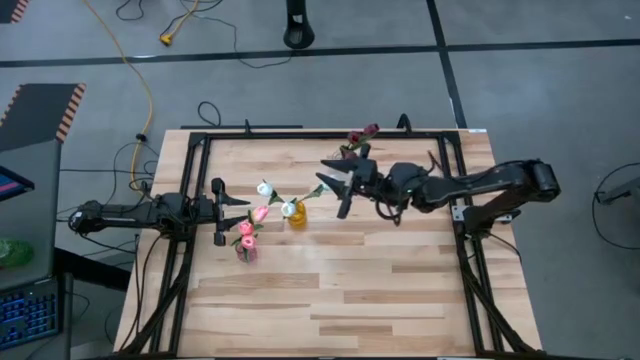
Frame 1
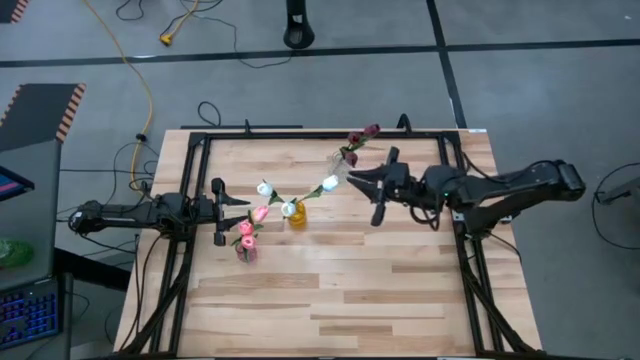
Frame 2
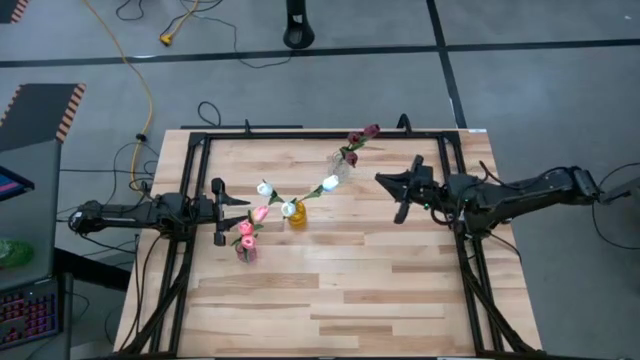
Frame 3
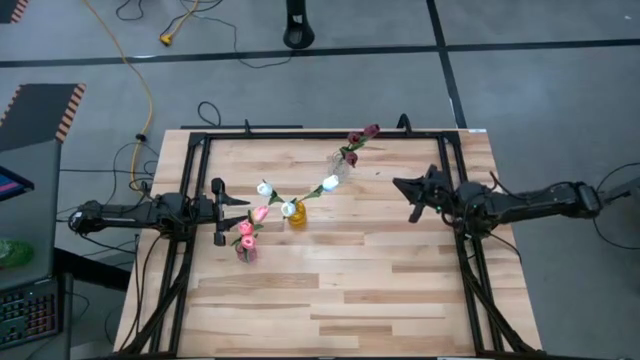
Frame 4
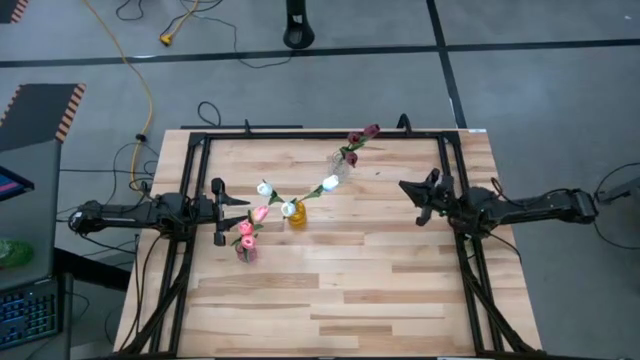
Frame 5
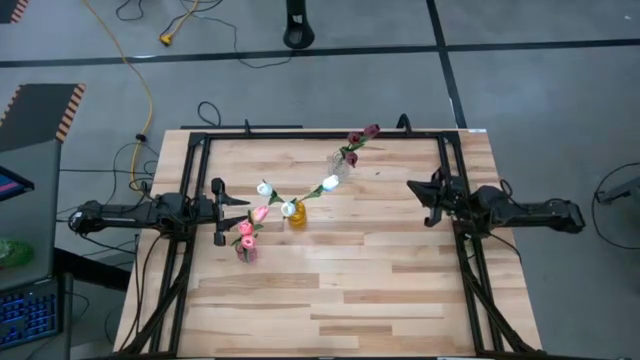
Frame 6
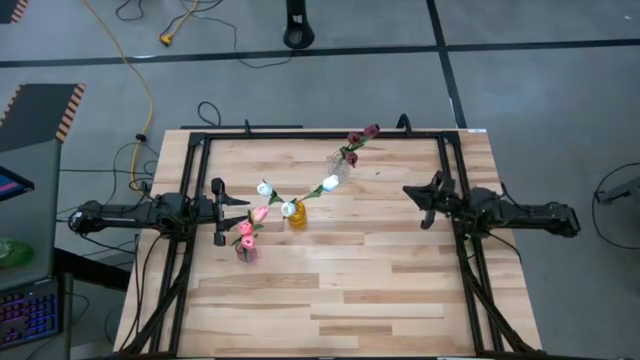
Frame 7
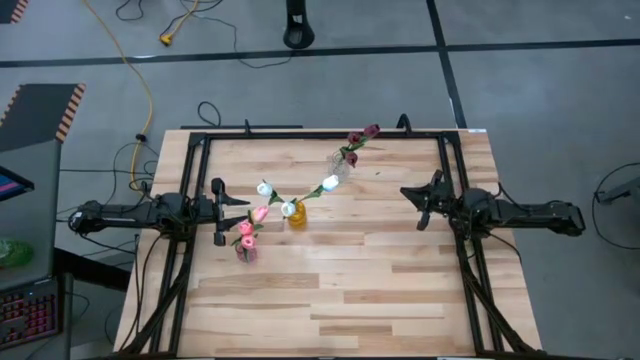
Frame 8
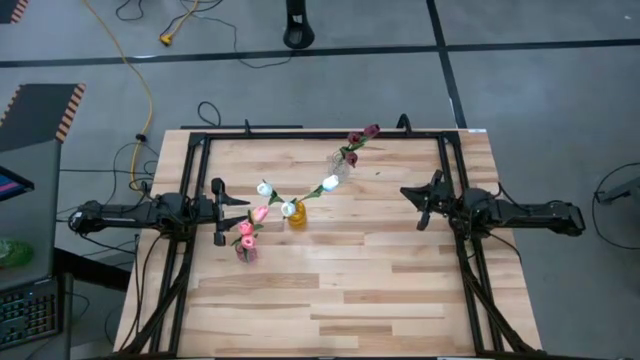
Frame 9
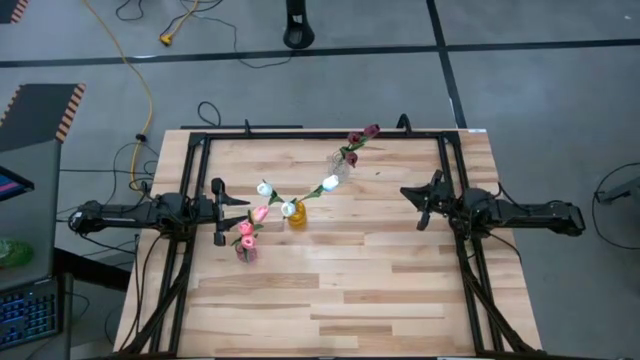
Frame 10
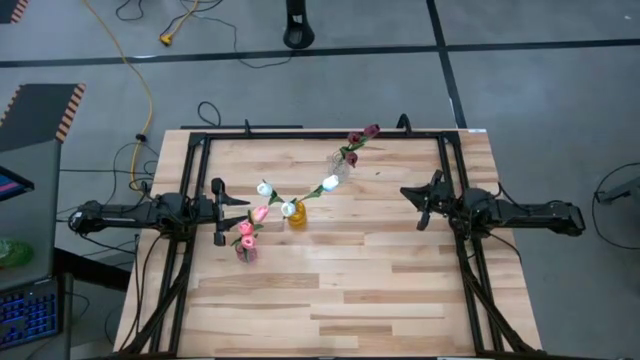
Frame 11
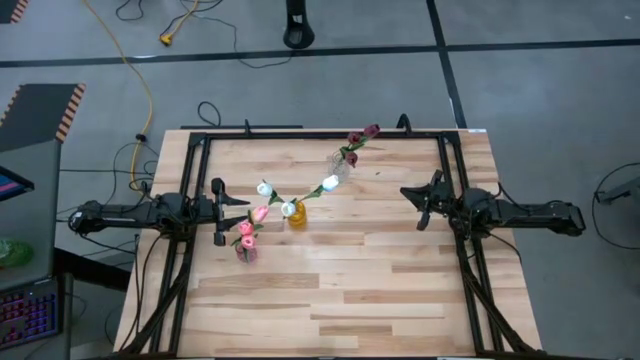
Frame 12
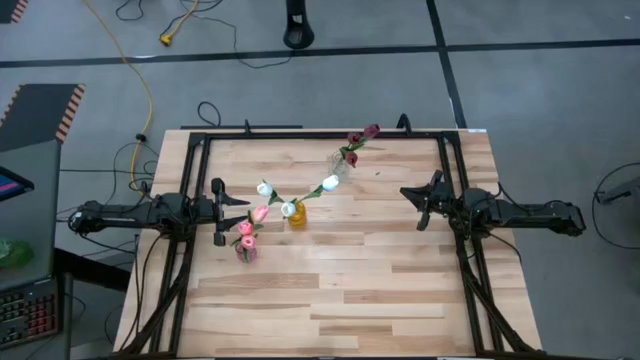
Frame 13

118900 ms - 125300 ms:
Task: Sort flowers into vase by color
Return to Home Position

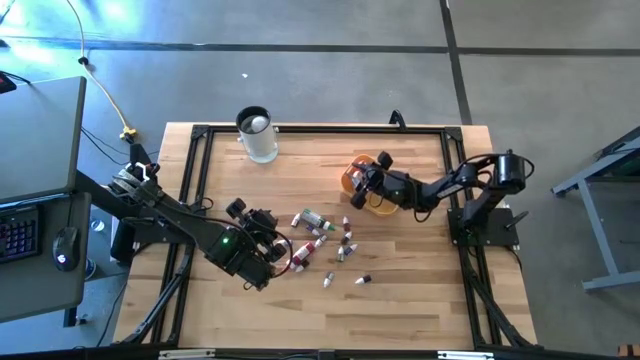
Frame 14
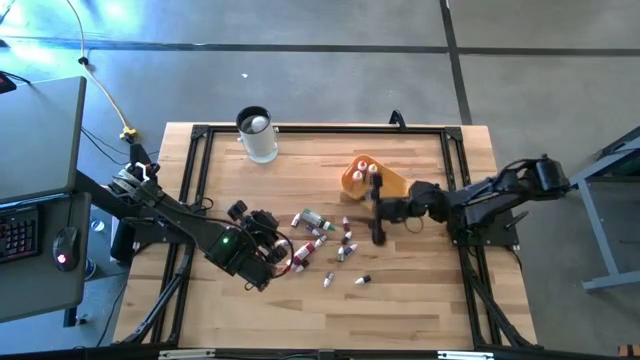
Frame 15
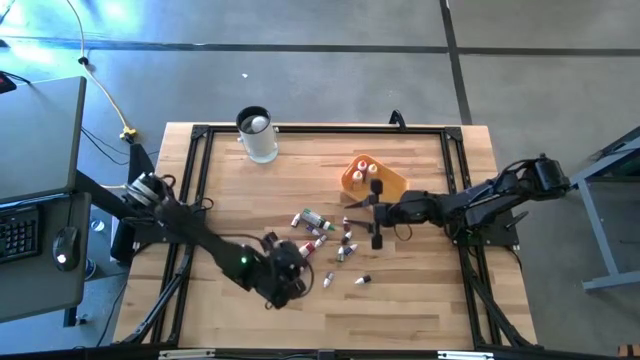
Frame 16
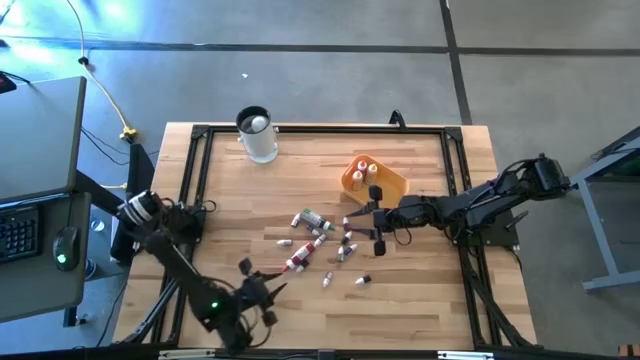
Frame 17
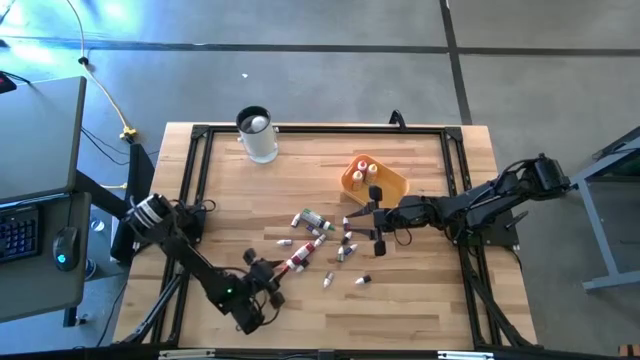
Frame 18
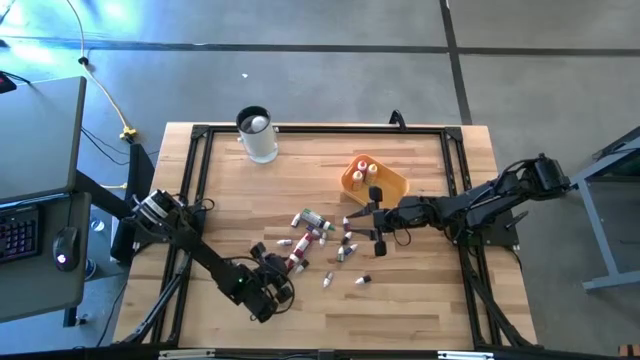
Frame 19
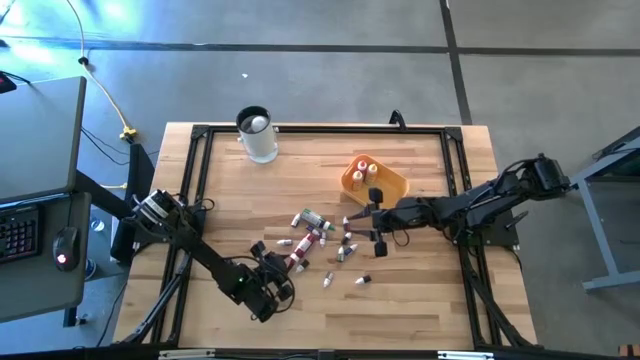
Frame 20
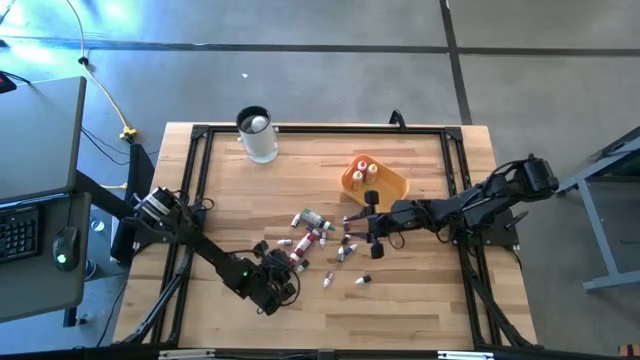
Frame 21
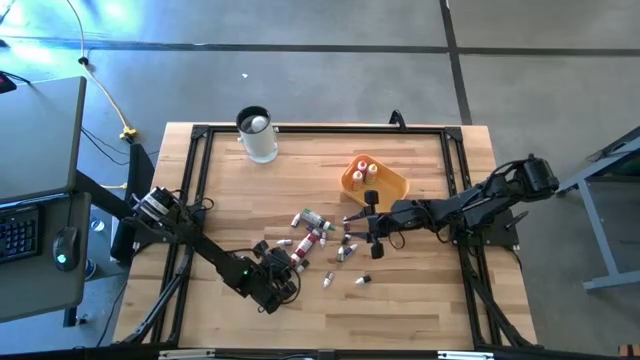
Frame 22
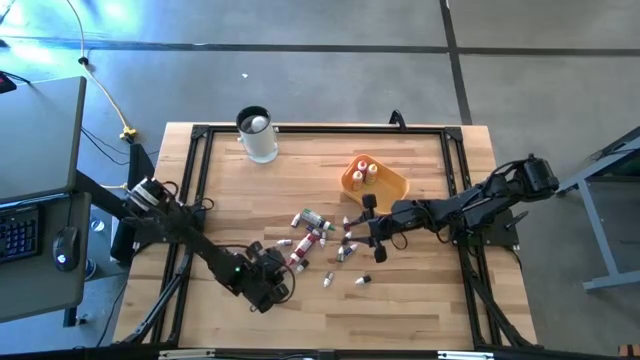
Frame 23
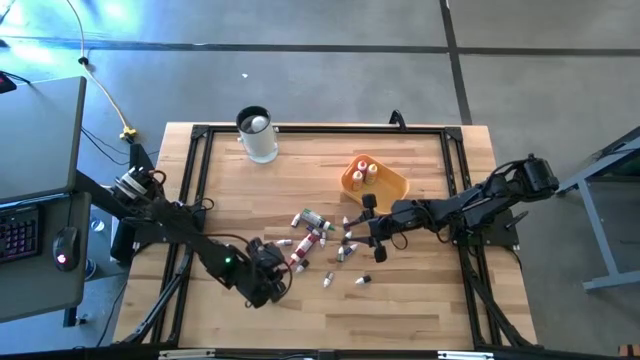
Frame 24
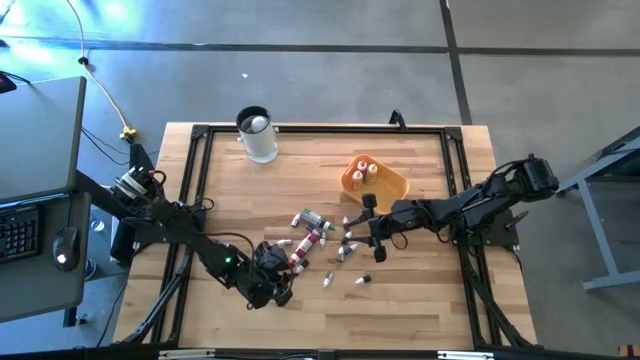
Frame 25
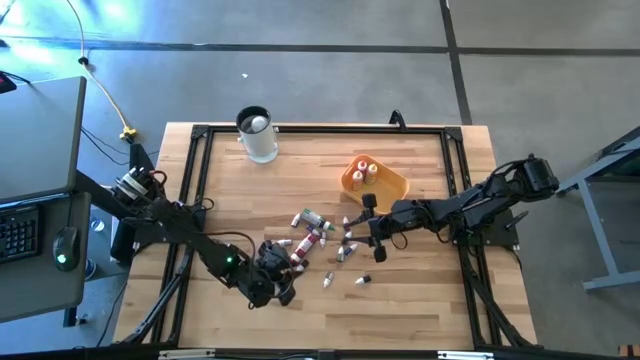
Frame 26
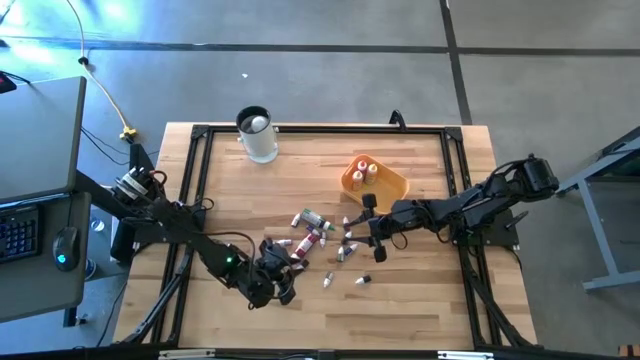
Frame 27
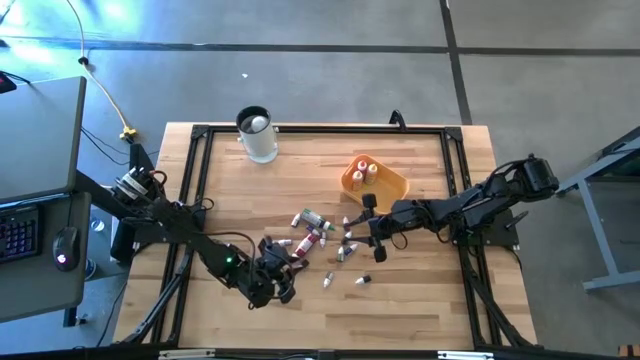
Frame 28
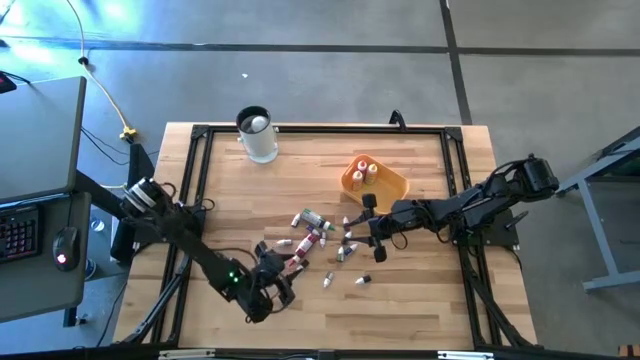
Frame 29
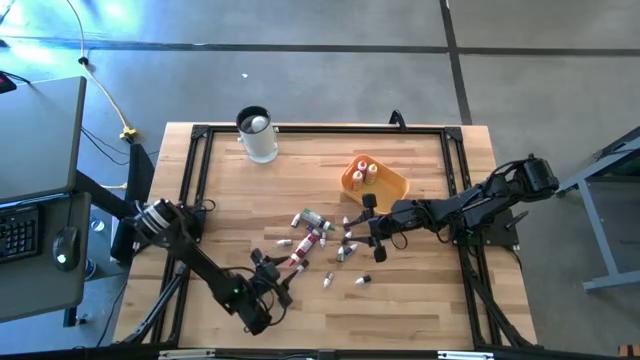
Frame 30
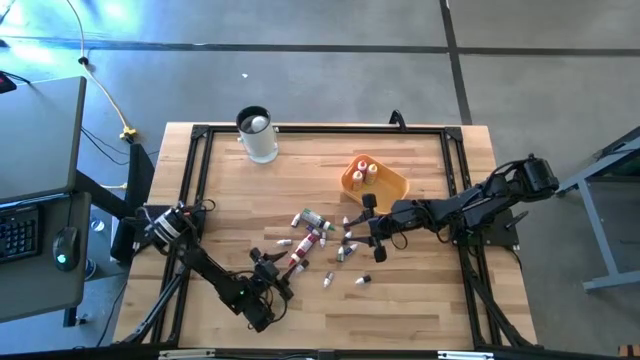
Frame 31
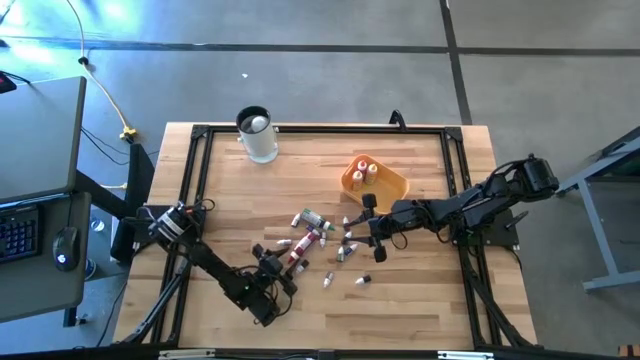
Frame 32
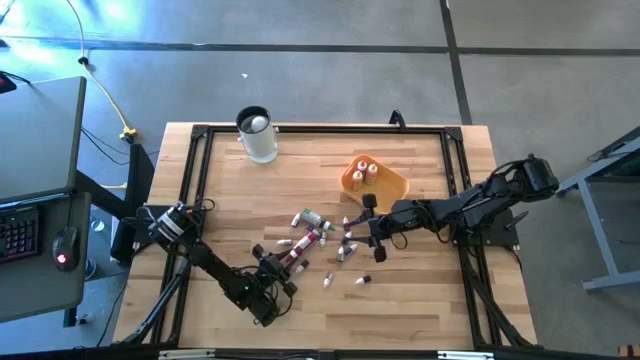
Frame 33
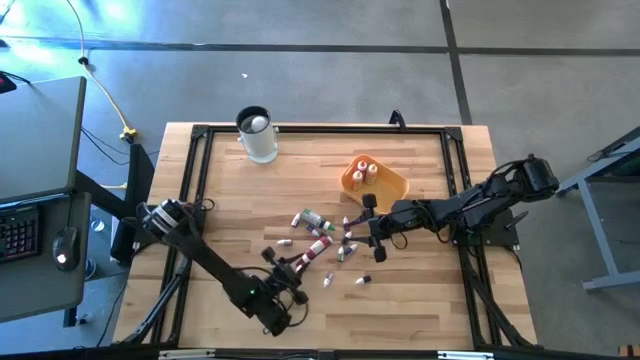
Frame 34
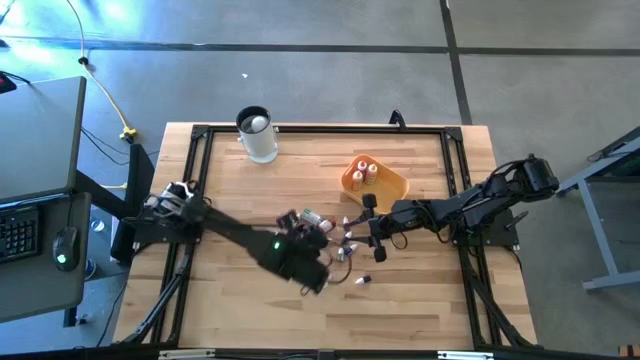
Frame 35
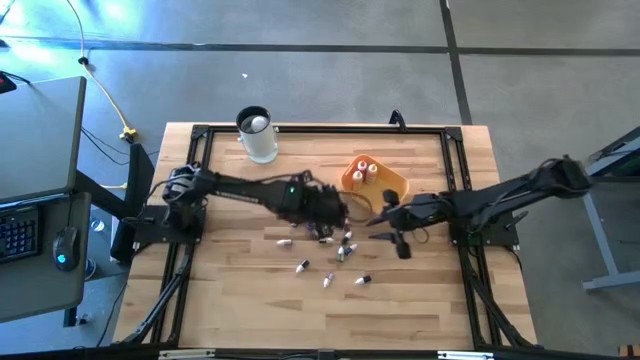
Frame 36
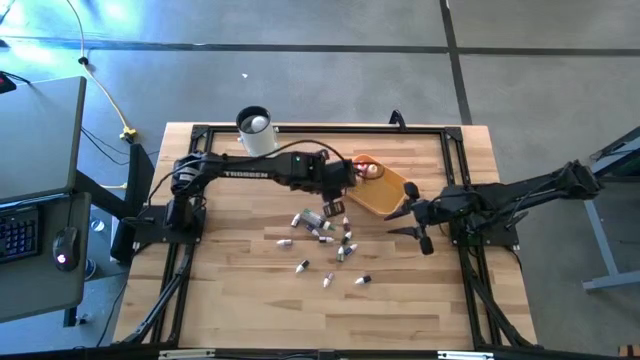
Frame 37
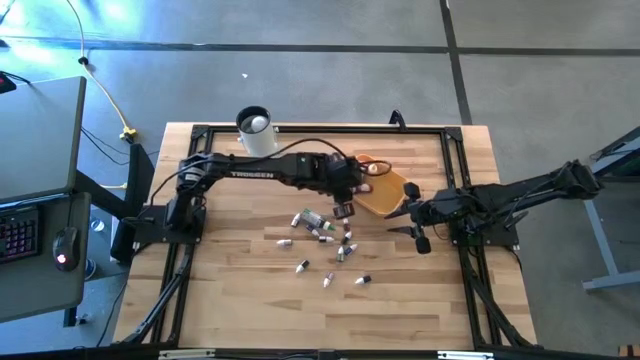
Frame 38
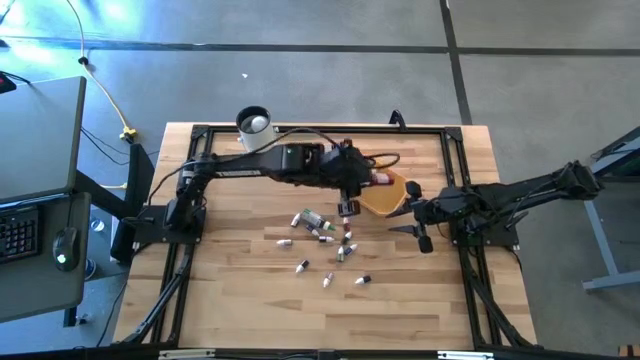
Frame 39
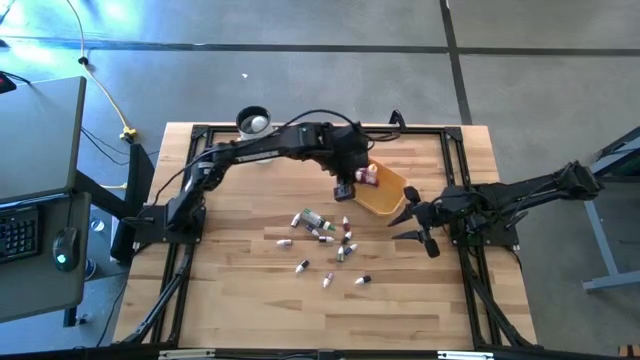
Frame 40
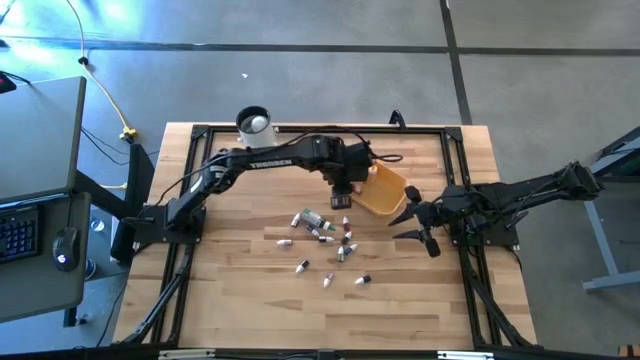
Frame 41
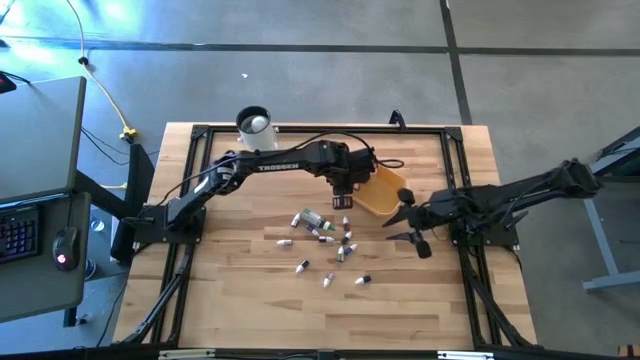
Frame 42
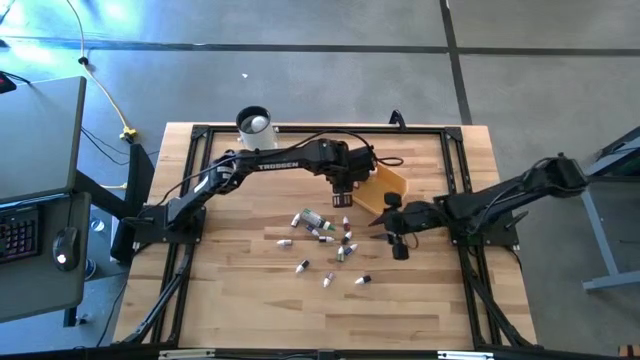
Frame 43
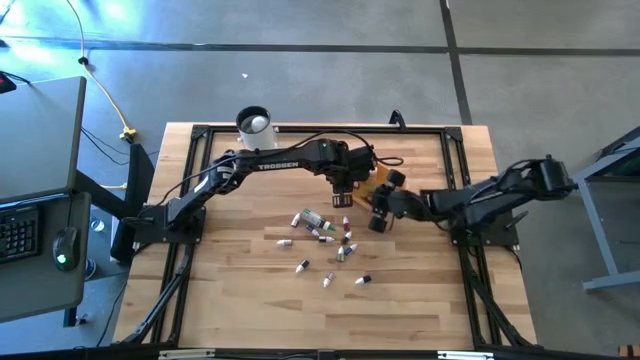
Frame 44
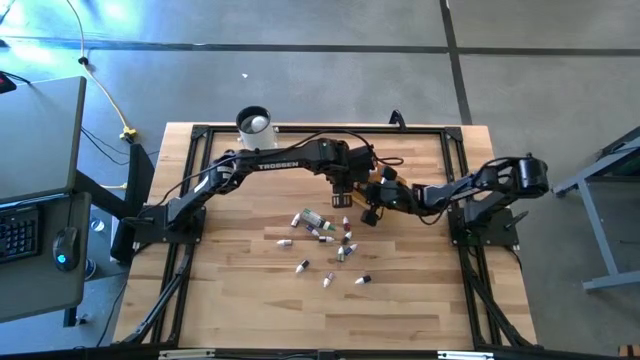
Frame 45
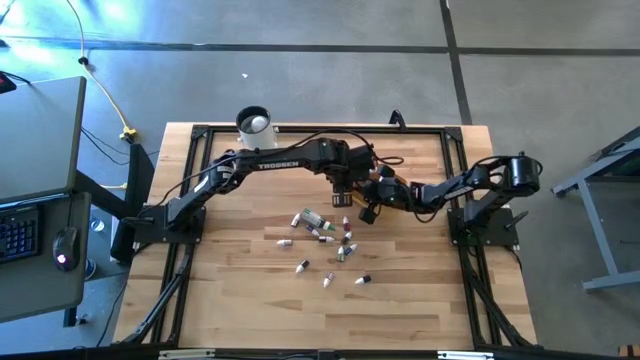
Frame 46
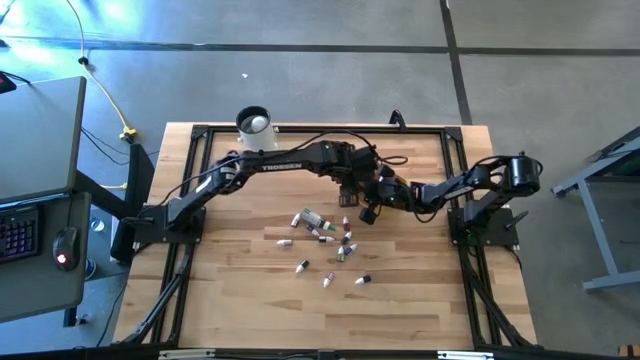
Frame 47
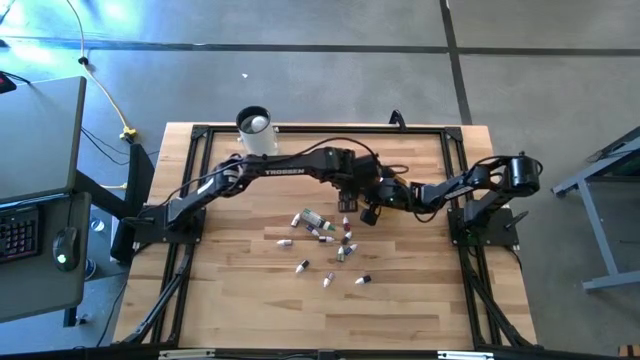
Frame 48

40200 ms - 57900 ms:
Task: Pick & Place food coloring
Put the large red food coloring bottle into the yellow bin
